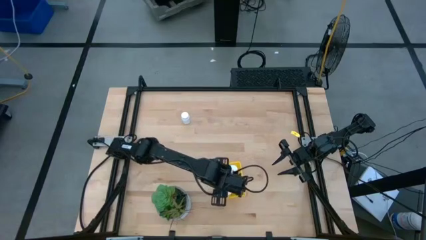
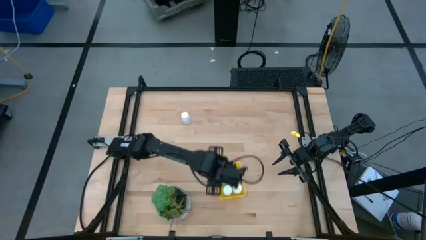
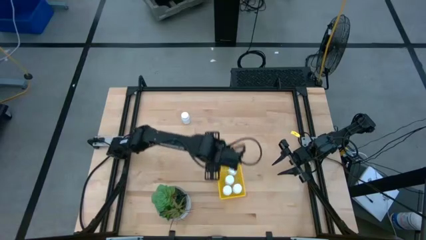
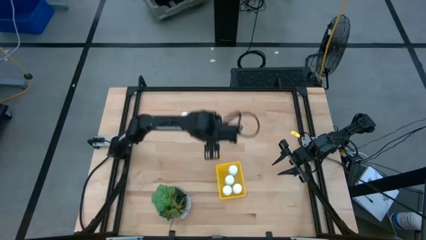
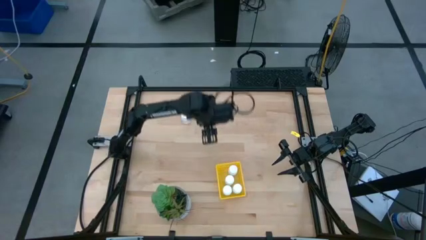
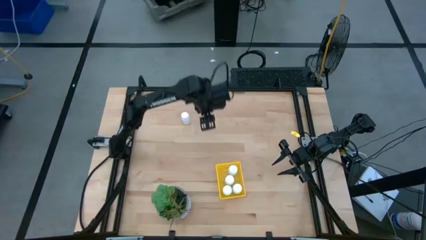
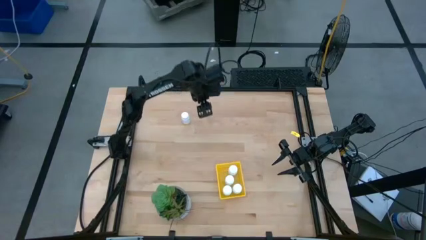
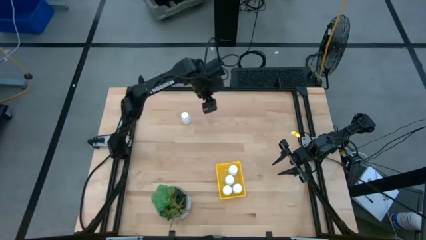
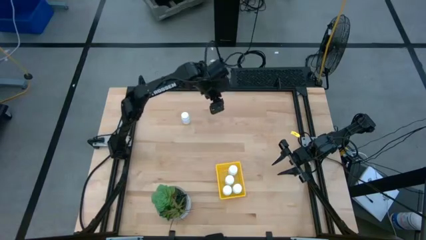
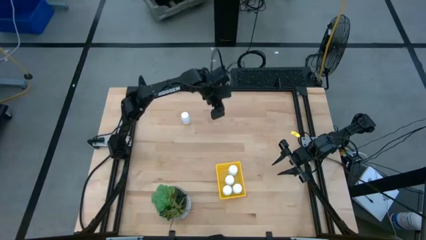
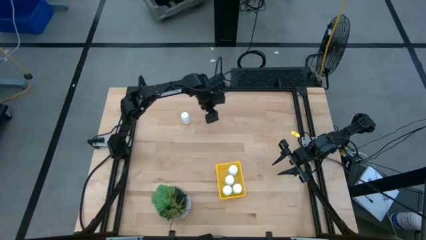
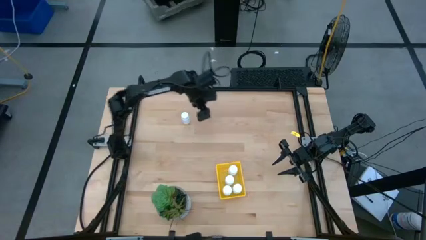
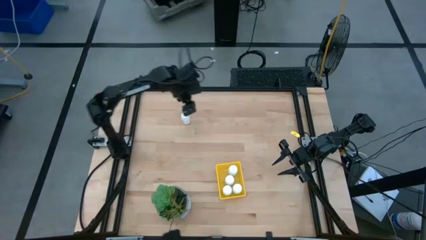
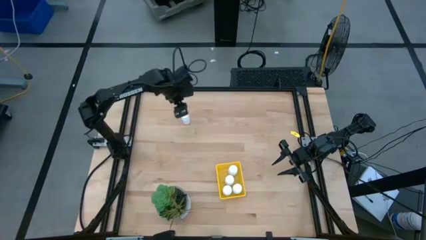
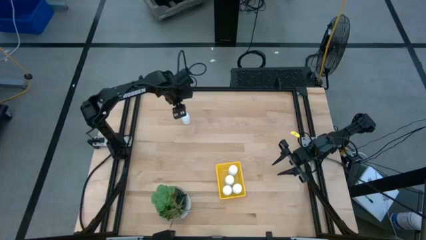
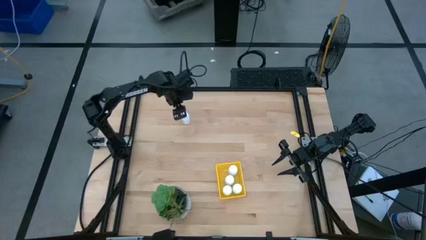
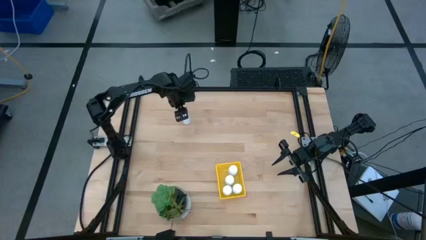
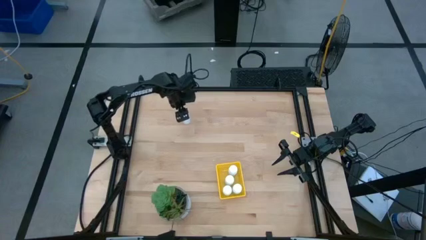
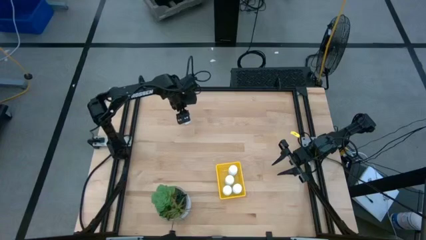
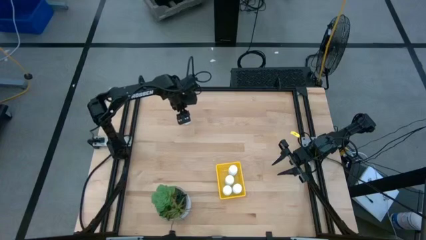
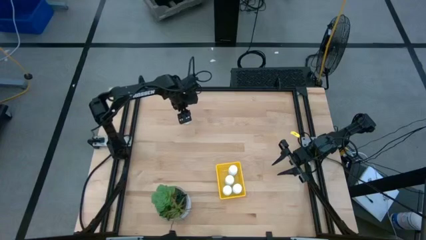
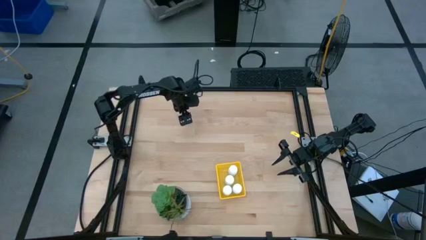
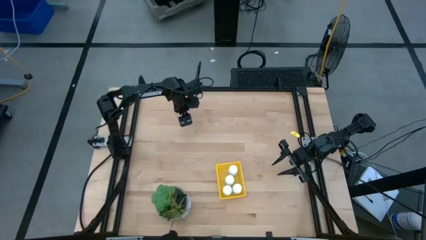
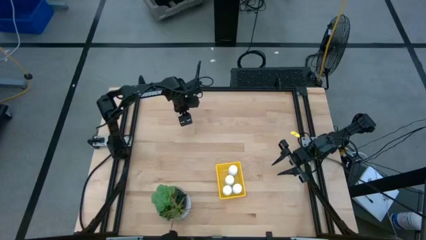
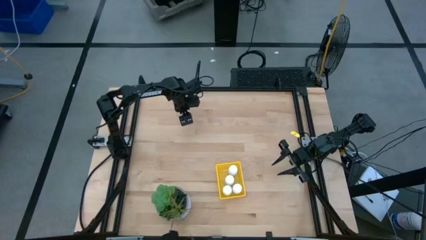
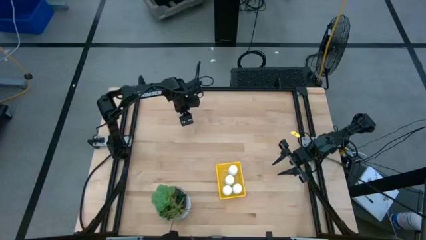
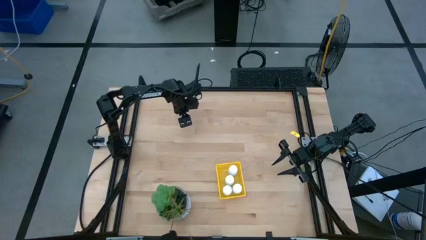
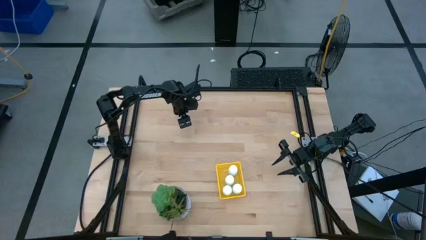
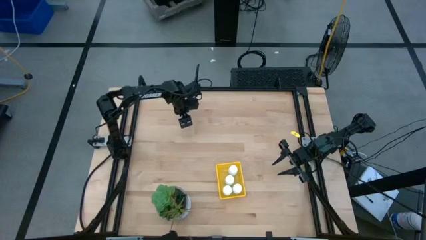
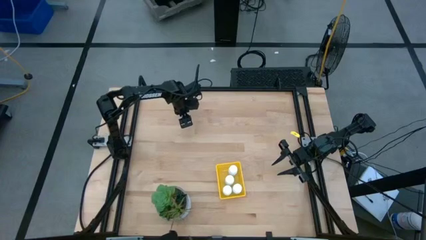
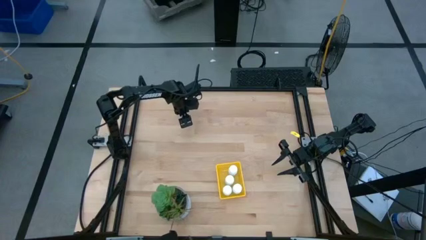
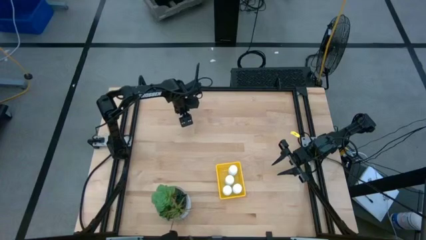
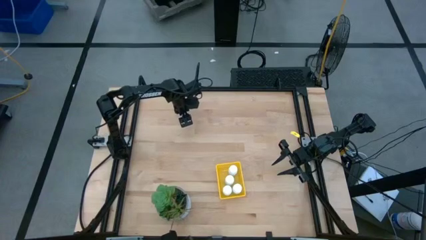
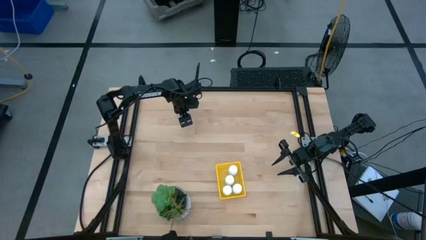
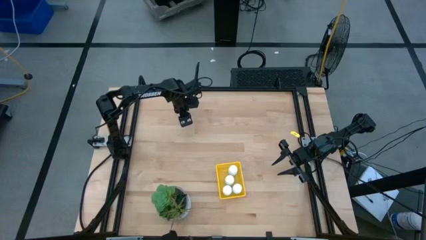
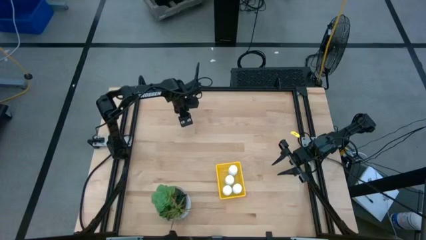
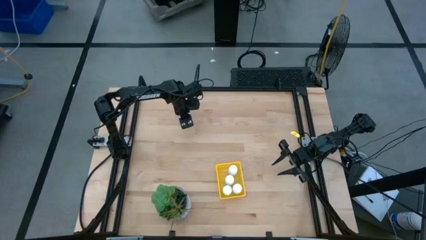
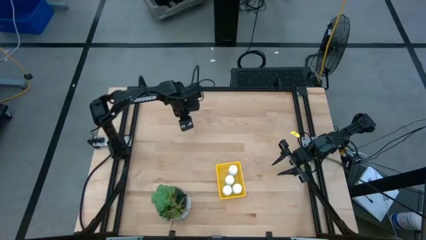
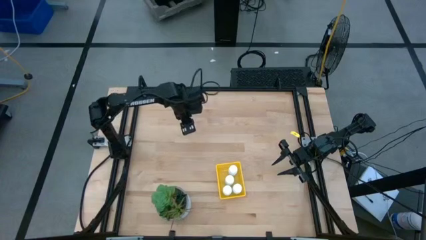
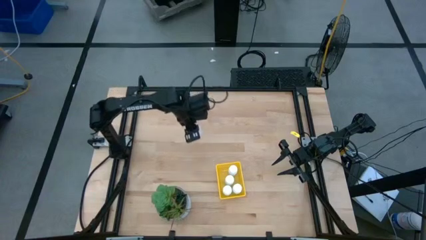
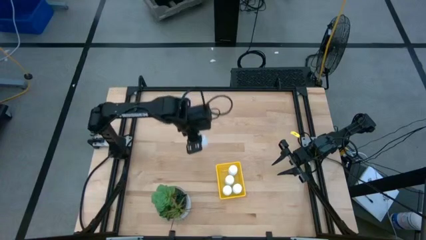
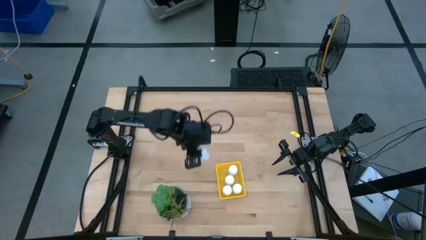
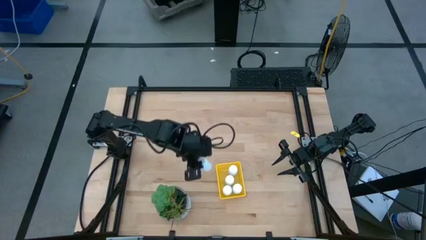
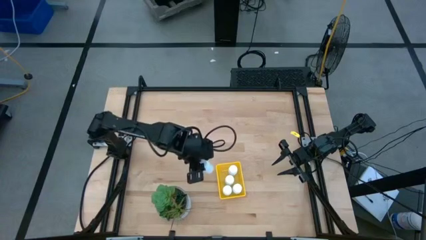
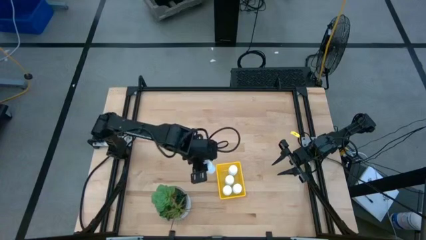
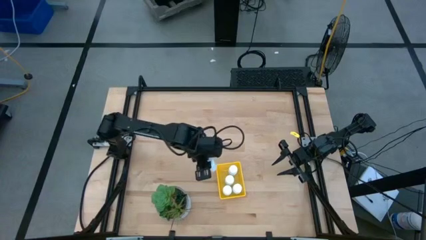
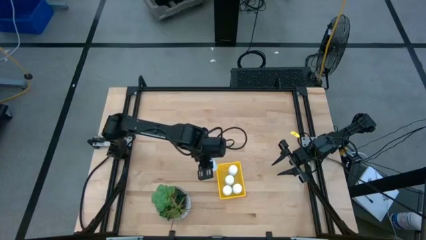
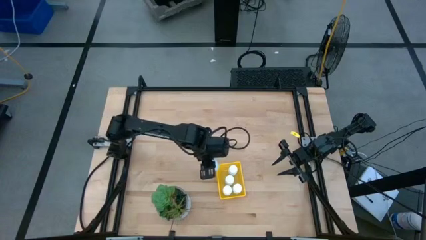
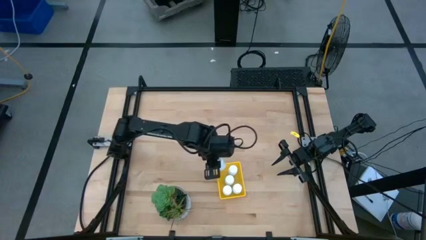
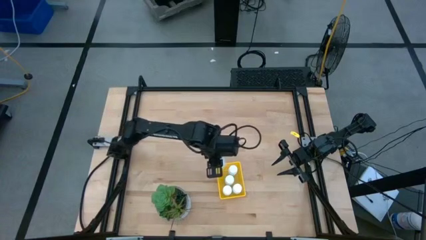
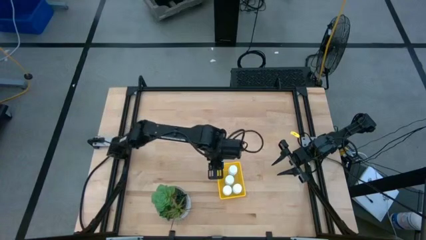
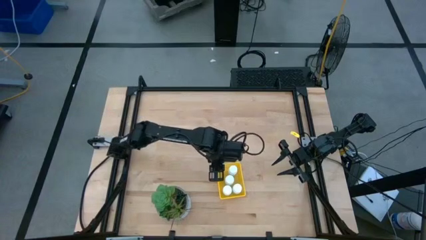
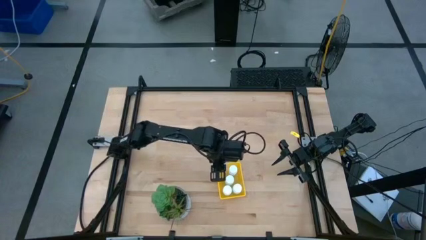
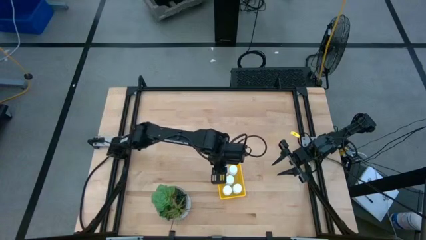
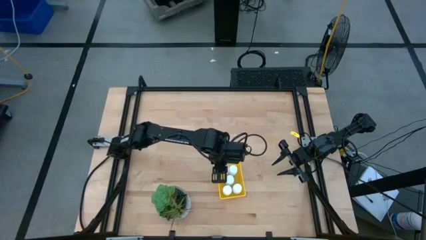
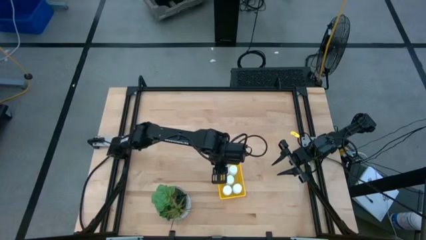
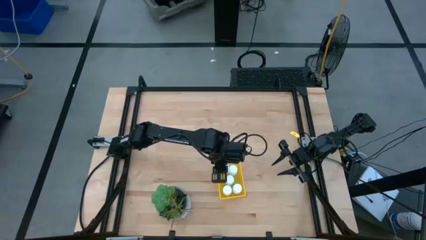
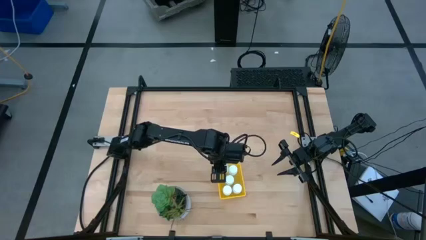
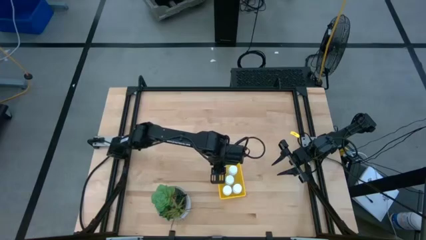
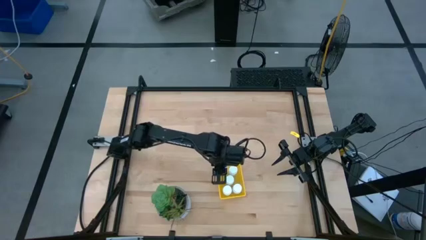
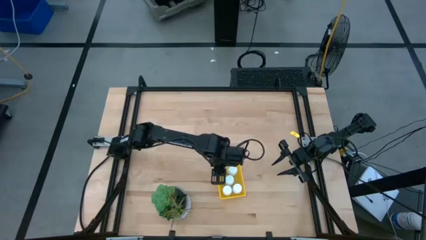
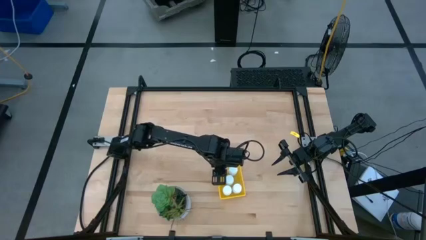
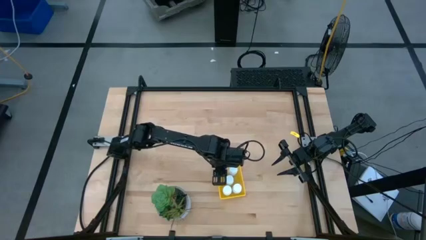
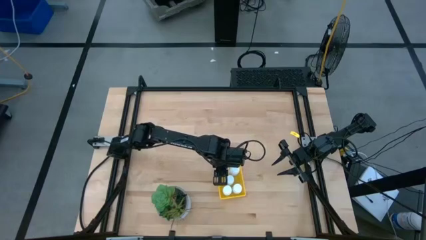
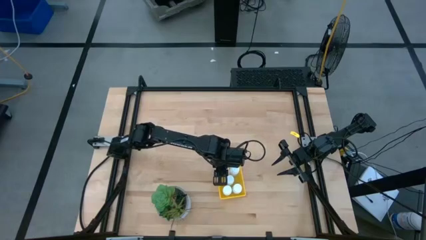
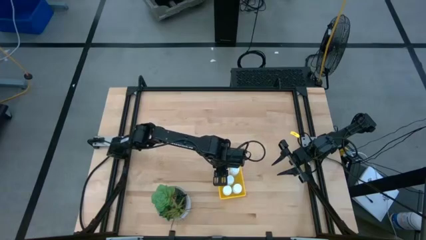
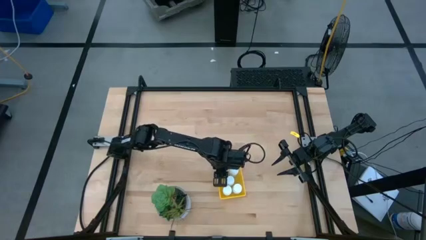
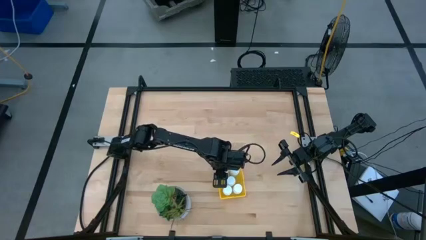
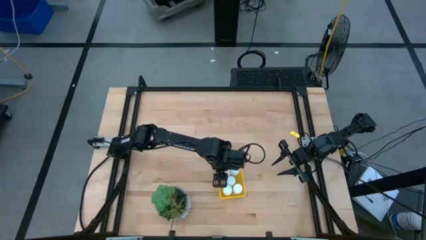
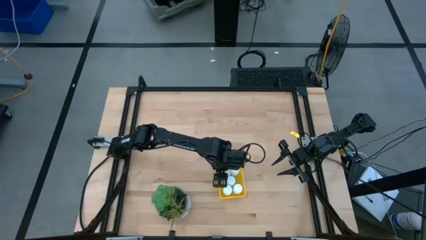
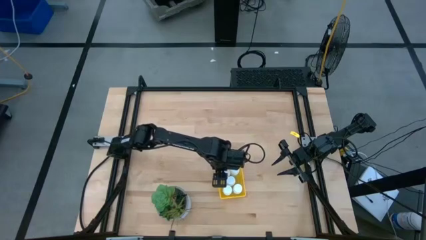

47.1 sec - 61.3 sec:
Task: Pick and place pill bottles into a basket
Put the white pill bottle into the yellow bin
